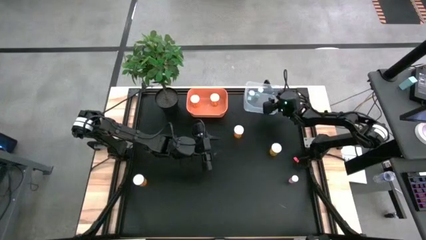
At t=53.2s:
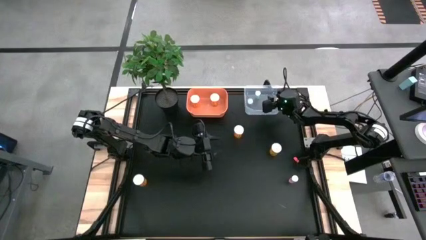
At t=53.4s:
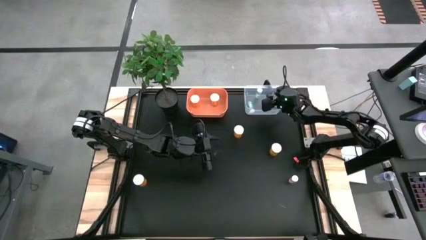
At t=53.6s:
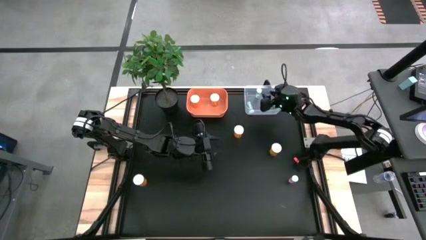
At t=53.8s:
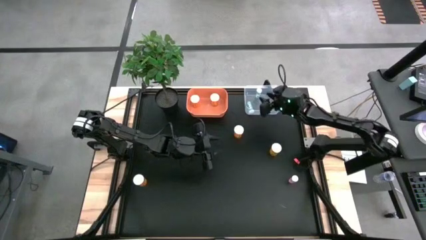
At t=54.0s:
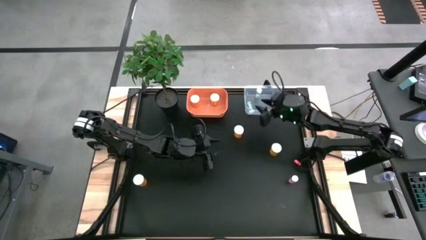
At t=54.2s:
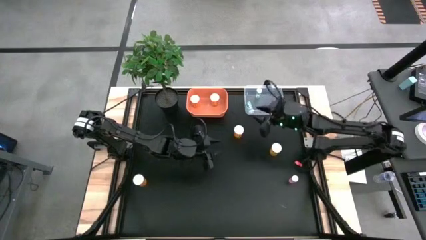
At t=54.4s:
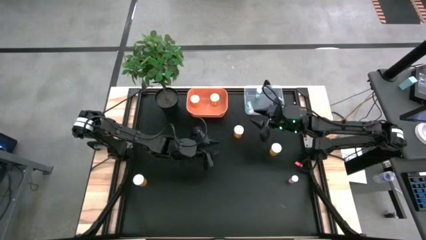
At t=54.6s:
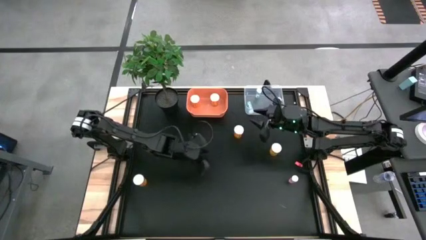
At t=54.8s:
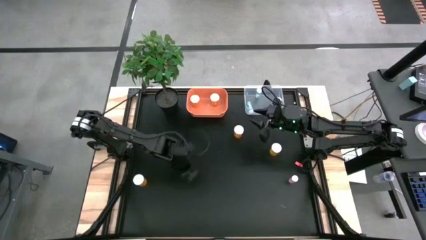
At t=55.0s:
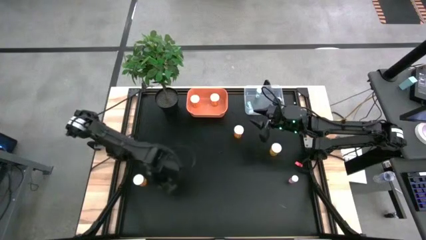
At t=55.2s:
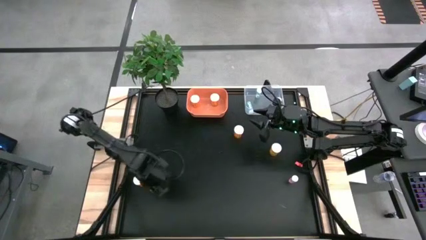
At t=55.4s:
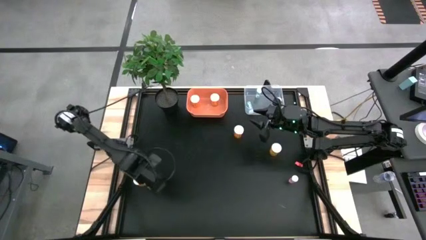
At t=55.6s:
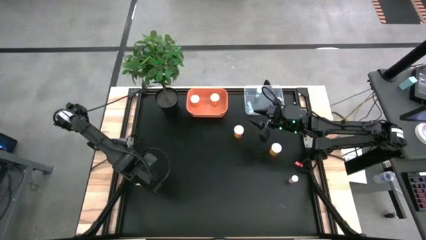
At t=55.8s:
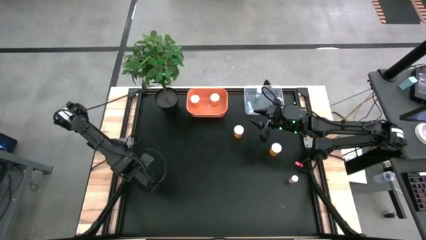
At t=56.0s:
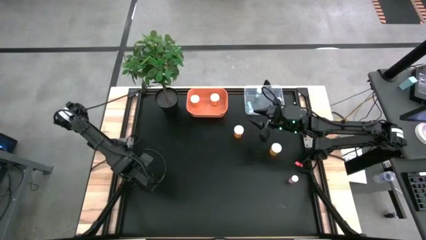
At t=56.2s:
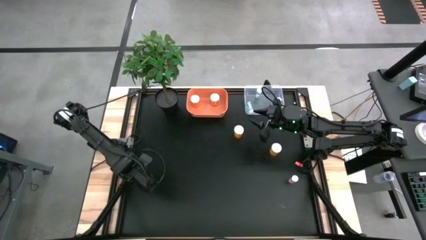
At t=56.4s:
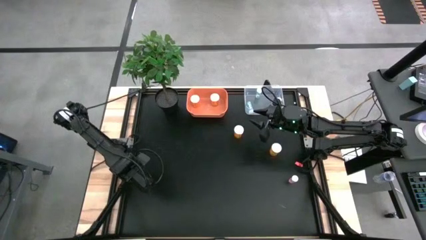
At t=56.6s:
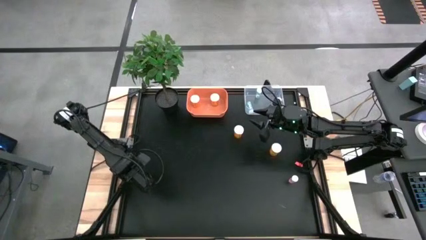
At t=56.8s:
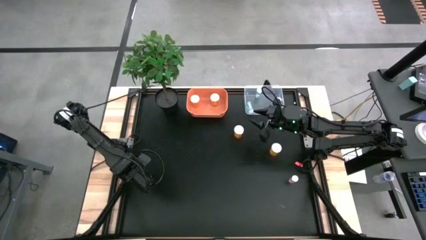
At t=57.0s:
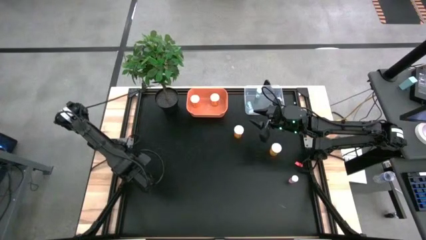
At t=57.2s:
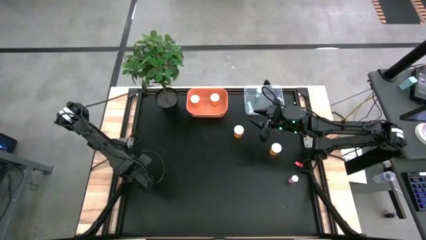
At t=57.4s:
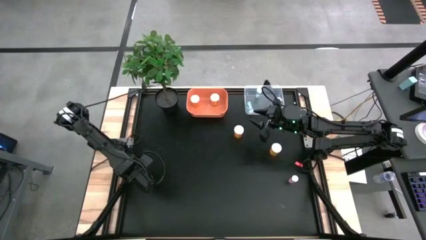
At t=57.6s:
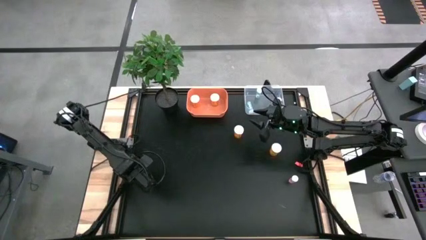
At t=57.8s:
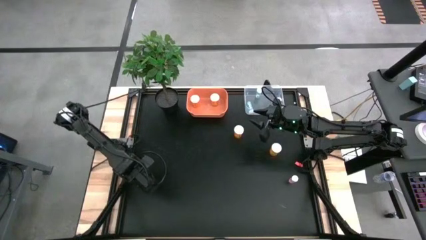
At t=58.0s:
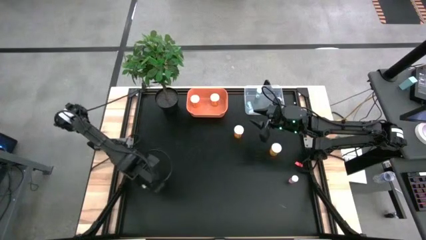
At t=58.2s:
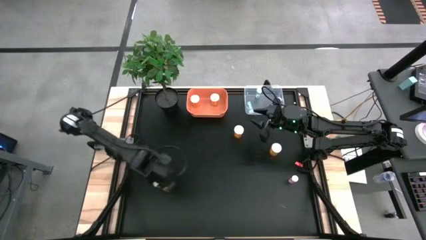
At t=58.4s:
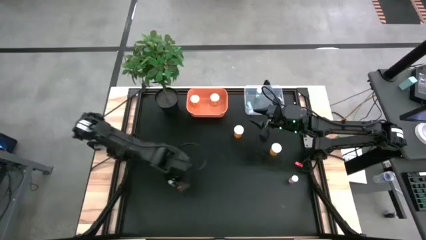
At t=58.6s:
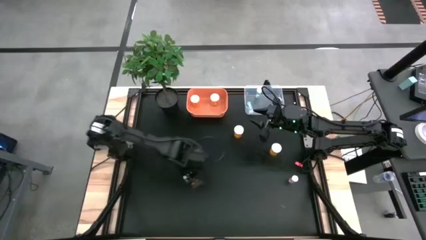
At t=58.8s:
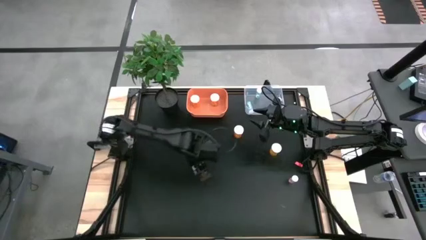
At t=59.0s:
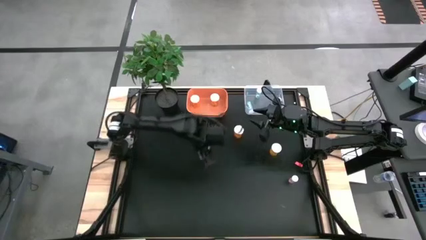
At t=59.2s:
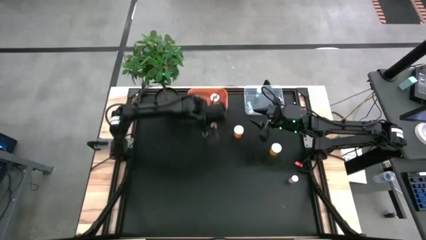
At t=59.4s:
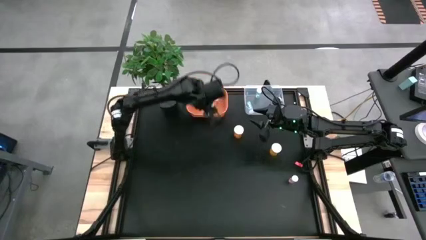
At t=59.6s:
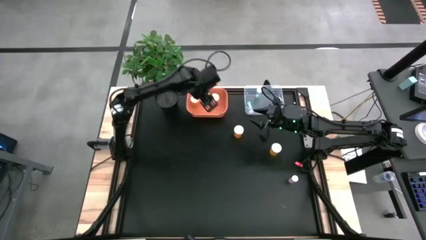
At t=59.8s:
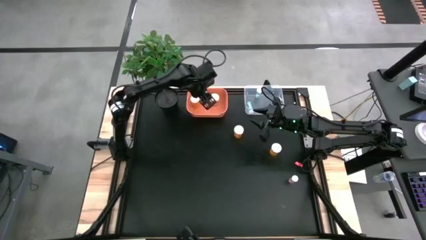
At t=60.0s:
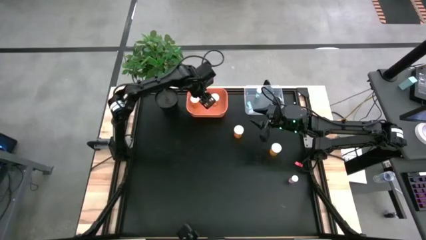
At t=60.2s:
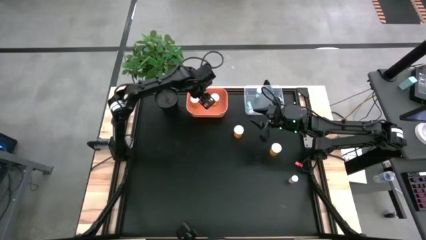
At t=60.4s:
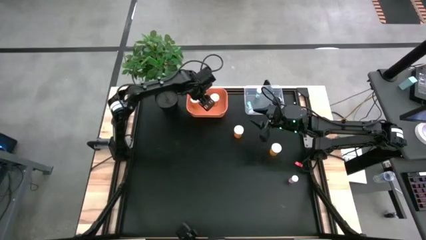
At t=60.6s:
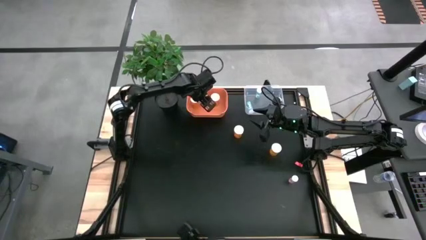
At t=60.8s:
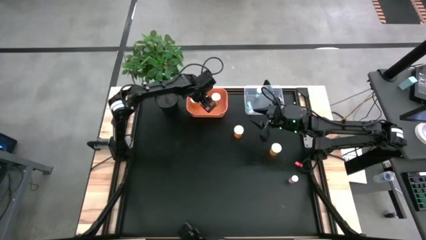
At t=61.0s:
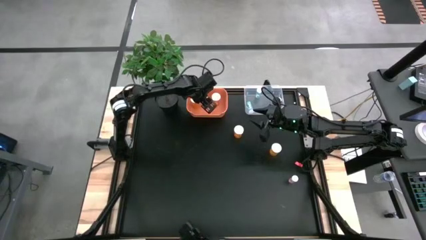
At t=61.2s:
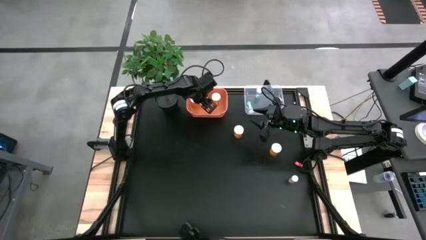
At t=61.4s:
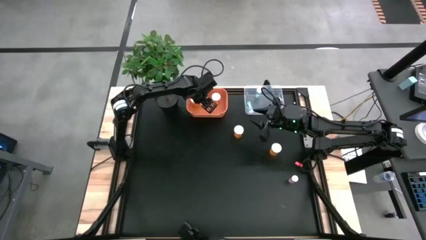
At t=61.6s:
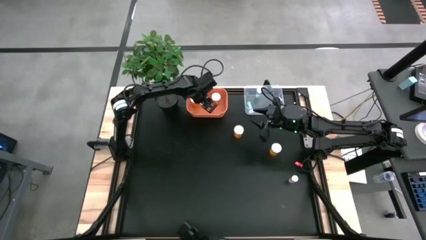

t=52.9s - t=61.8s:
Task: Pick and place medicine bottles into bin by pill shape (circle, oval)
Put the orange pill bottle into the orange bin

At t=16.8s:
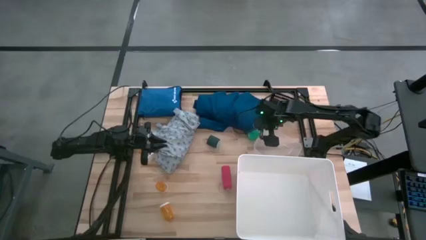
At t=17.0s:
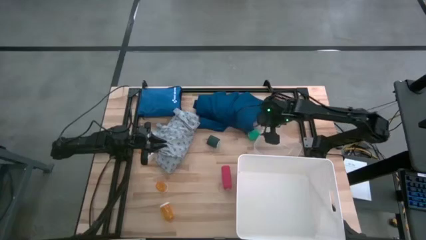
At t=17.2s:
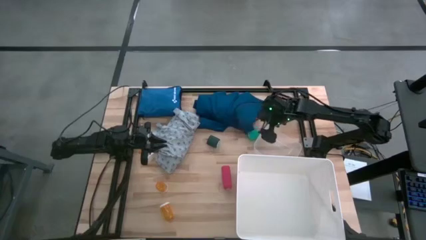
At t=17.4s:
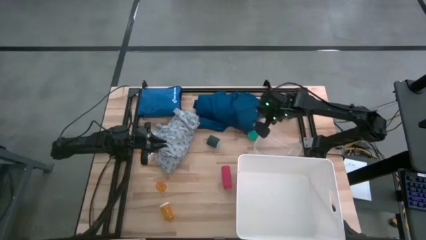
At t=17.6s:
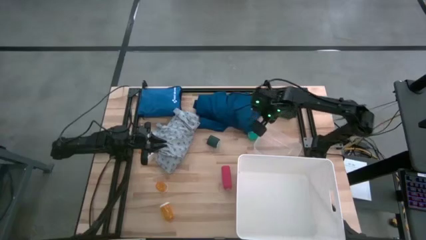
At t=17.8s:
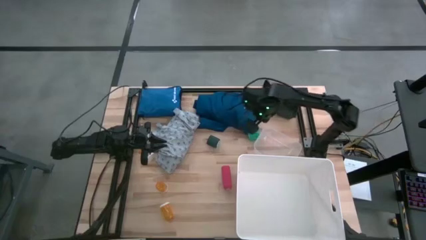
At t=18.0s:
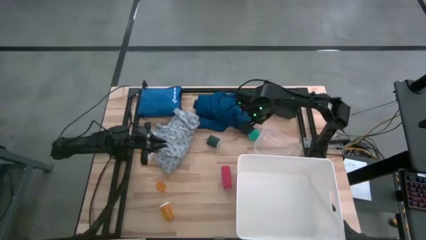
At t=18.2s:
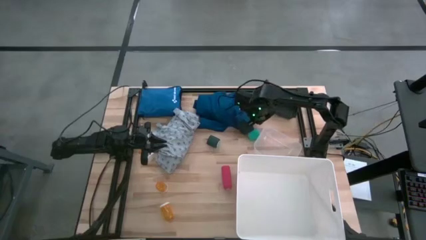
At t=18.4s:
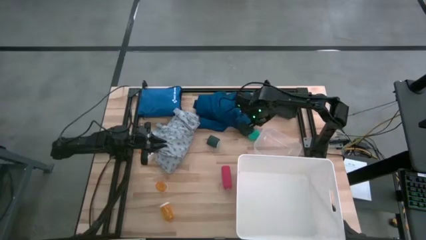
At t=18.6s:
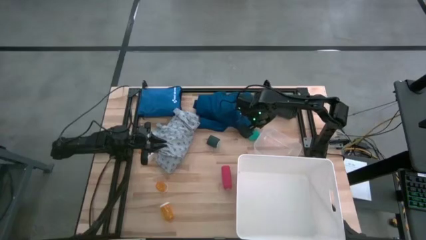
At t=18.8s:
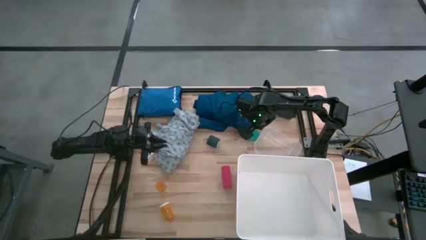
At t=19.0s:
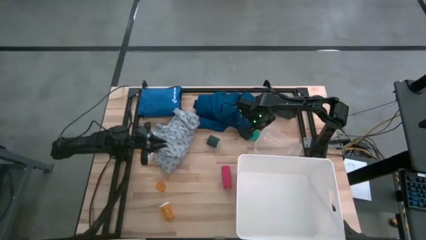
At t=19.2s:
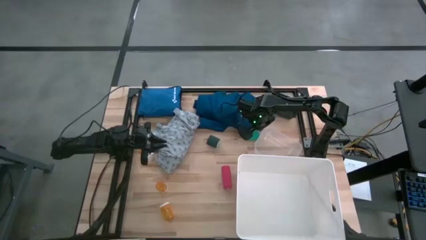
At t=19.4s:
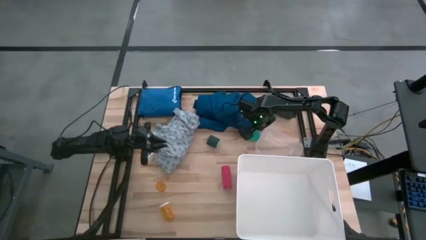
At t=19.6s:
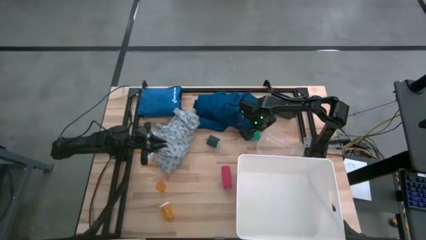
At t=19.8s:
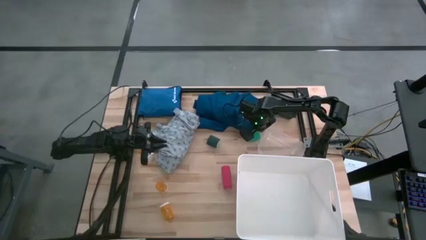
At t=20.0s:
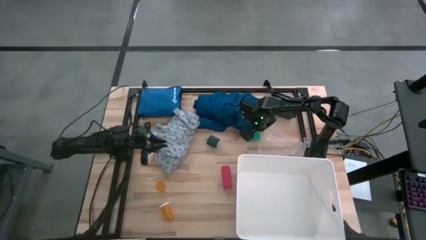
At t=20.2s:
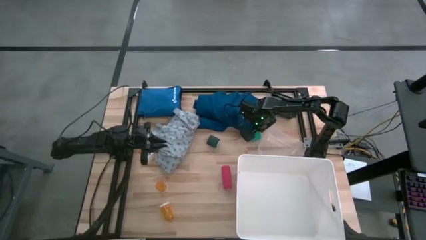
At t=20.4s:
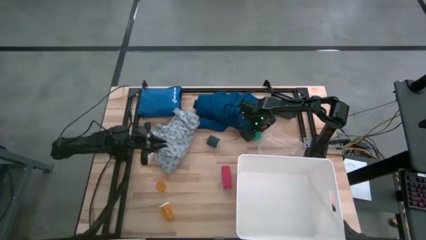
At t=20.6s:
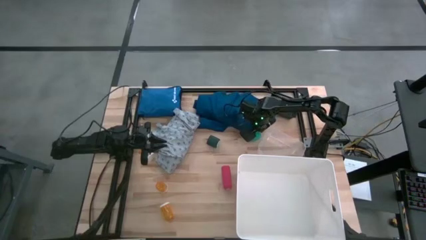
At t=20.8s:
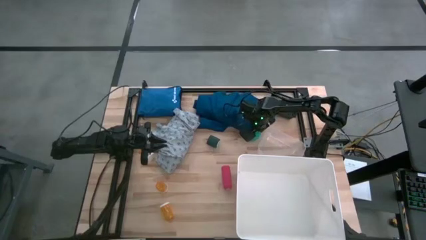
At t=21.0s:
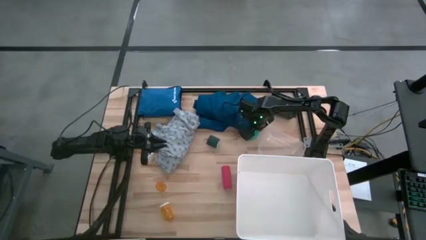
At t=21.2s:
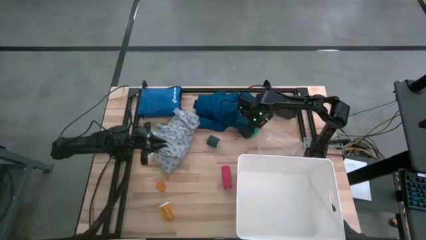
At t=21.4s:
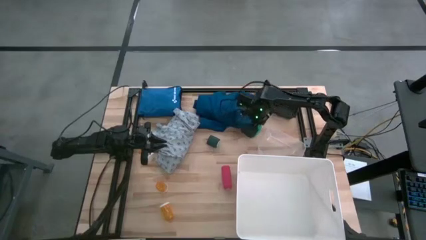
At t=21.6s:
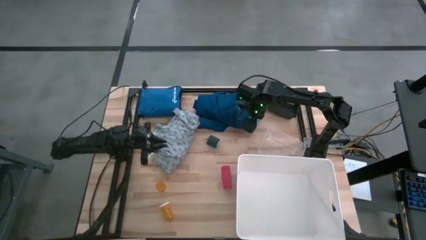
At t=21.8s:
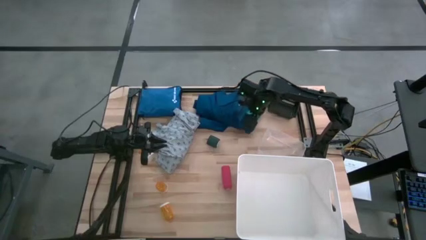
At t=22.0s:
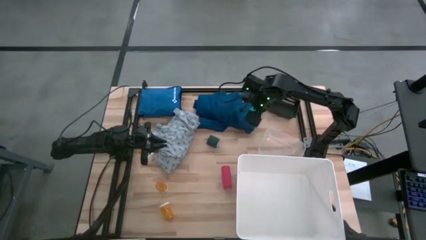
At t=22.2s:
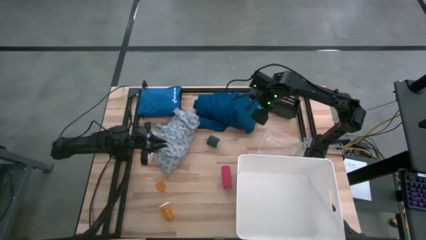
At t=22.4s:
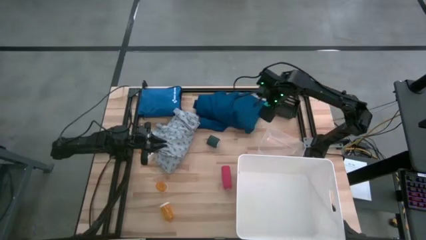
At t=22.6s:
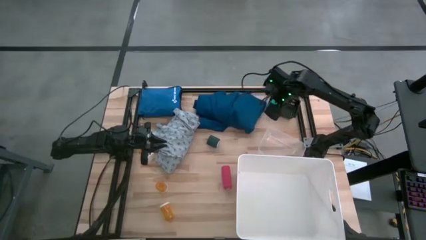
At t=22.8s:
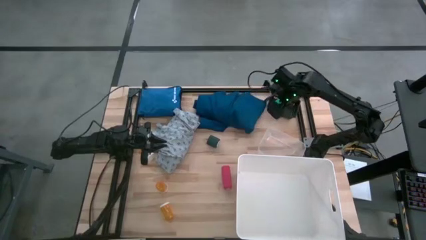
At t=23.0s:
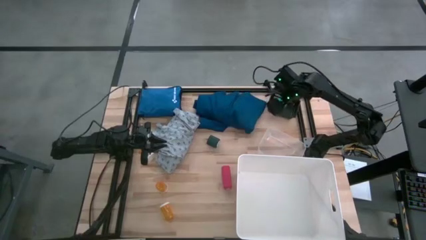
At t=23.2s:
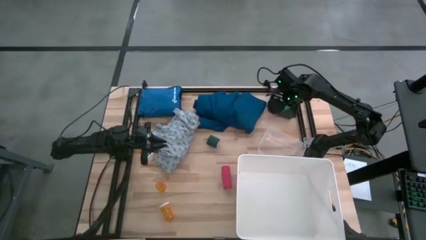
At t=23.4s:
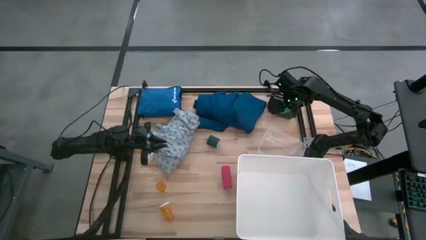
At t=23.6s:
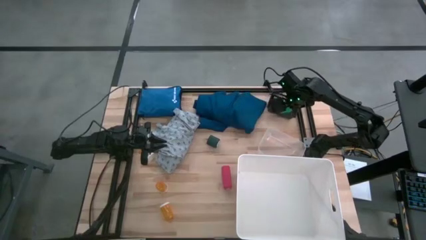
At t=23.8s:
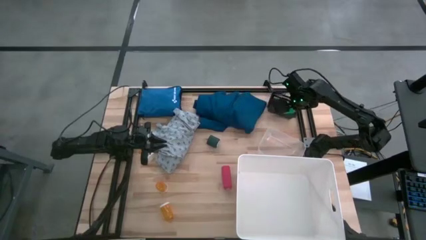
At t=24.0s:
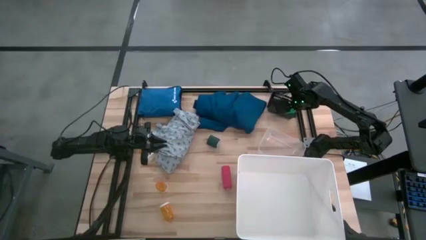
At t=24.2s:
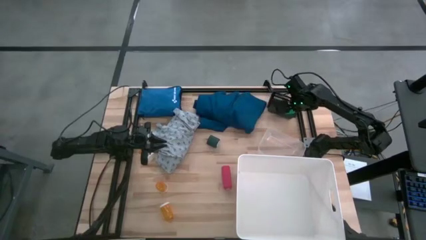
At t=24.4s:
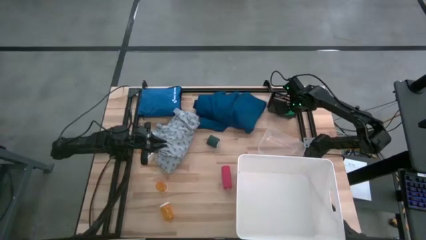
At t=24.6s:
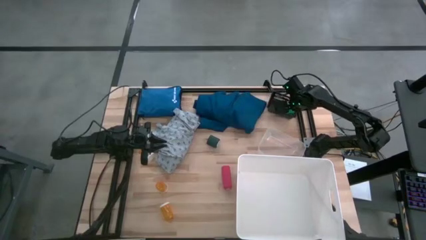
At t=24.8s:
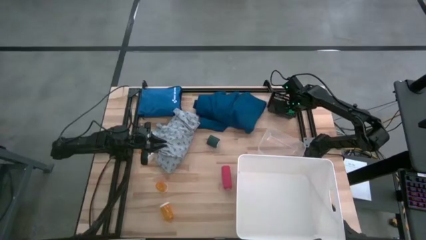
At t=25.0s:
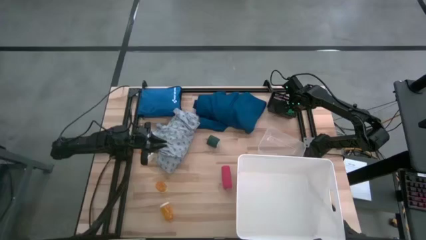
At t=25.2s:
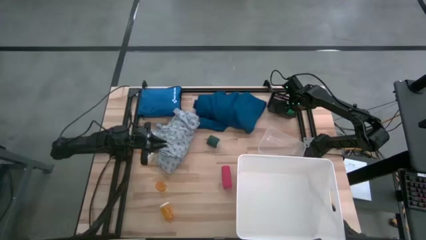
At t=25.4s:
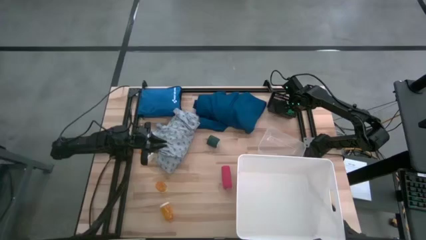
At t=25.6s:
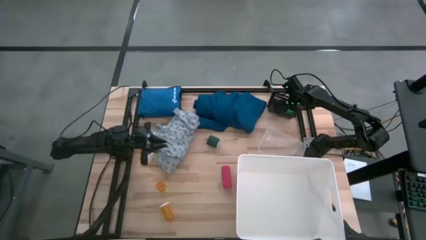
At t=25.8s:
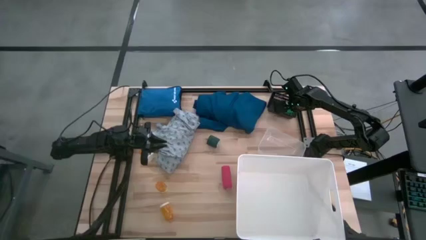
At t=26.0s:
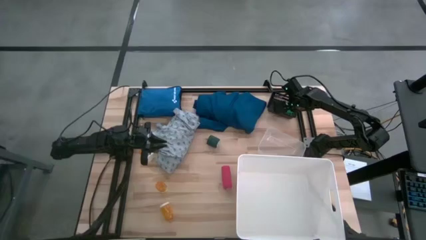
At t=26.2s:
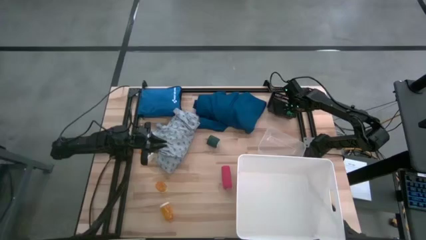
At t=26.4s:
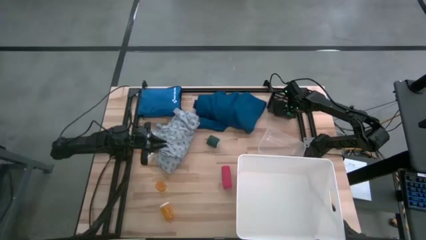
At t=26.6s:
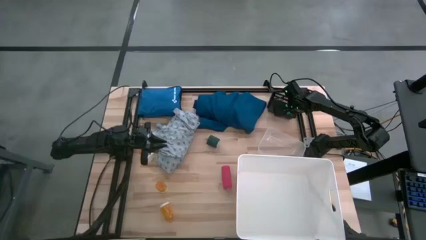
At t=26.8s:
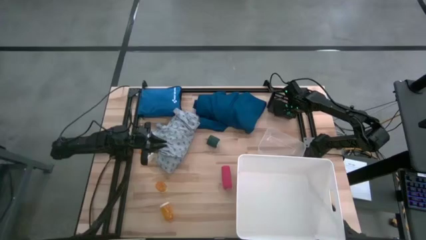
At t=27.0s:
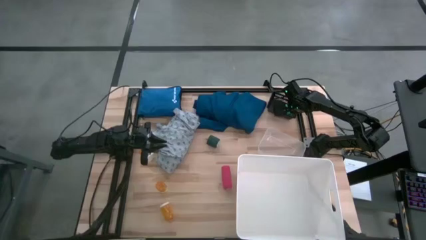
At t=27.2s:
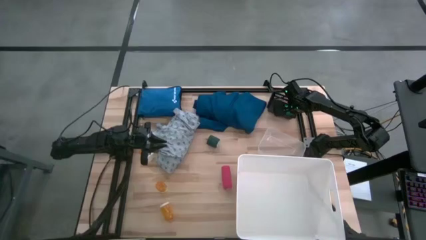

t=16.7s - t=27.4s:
Task: Pick & place medical supplies in basket/bin
Put the light green bandage into the black bin
